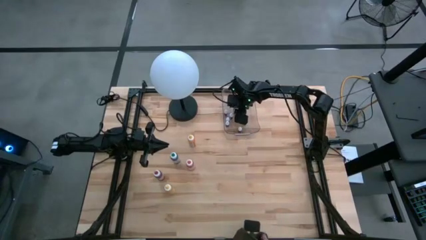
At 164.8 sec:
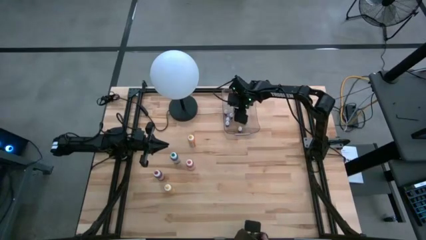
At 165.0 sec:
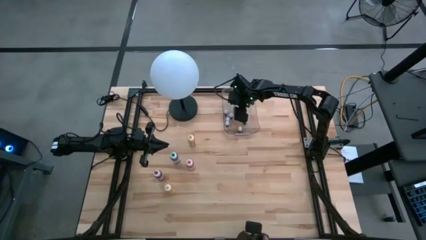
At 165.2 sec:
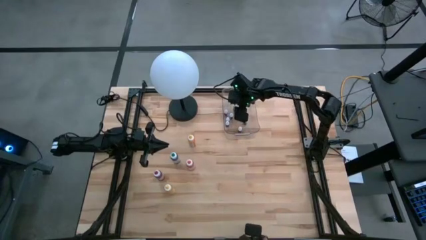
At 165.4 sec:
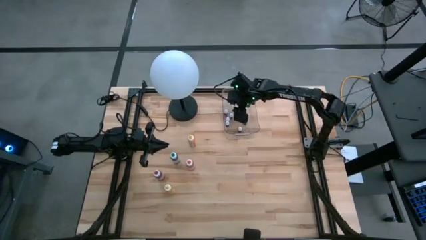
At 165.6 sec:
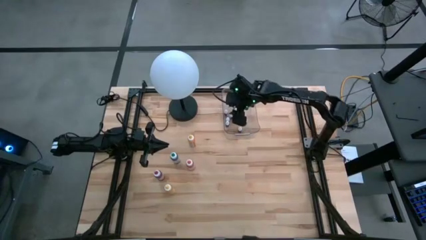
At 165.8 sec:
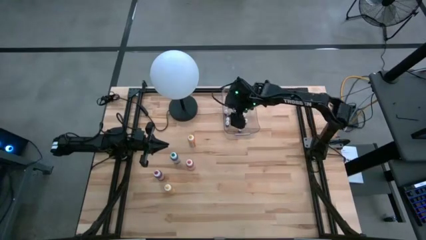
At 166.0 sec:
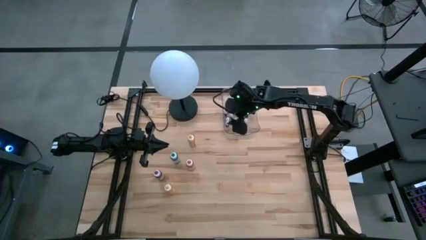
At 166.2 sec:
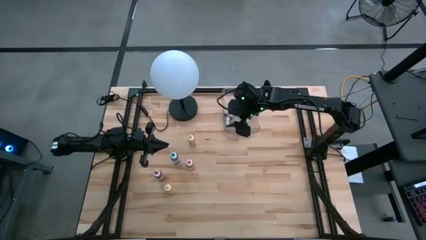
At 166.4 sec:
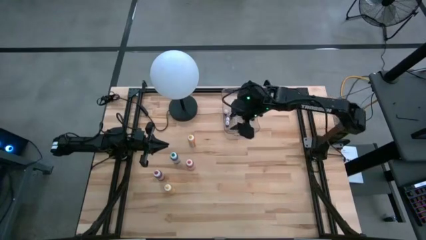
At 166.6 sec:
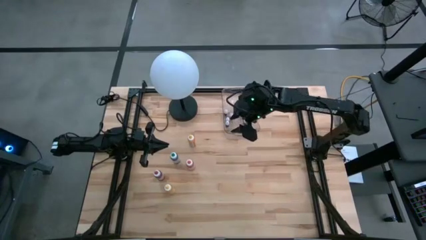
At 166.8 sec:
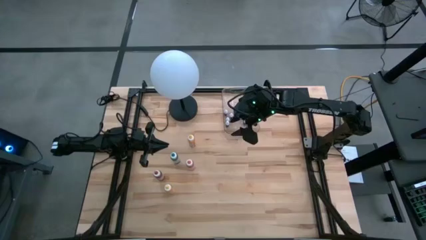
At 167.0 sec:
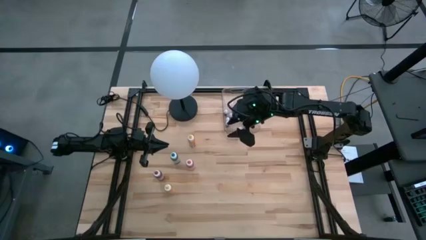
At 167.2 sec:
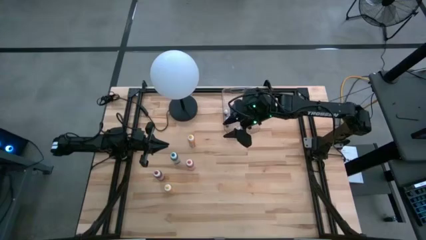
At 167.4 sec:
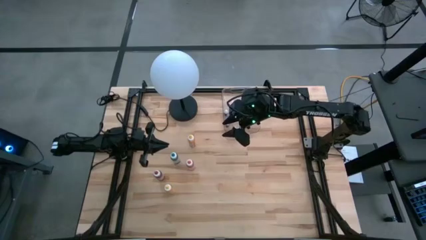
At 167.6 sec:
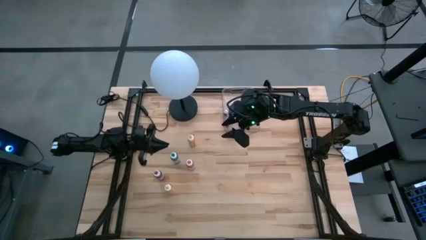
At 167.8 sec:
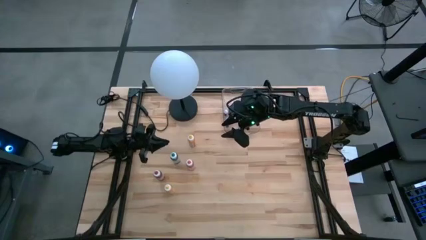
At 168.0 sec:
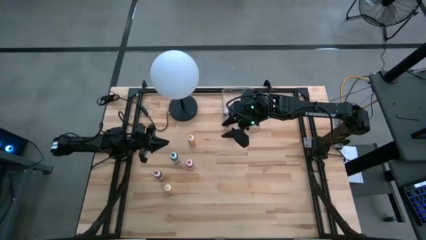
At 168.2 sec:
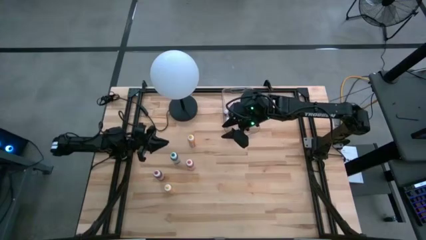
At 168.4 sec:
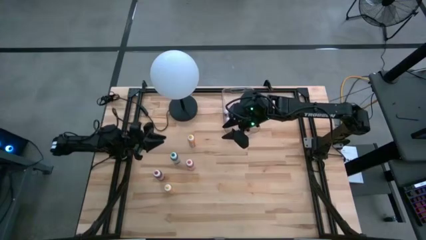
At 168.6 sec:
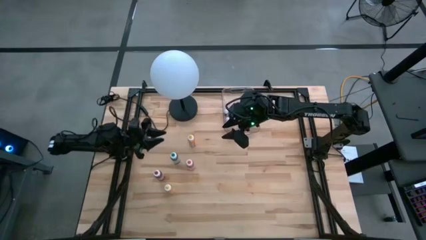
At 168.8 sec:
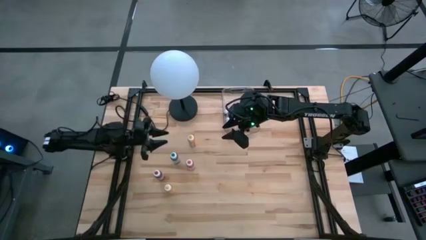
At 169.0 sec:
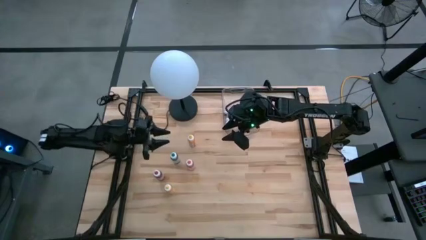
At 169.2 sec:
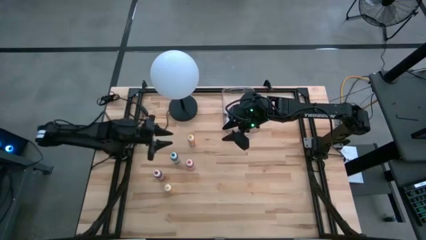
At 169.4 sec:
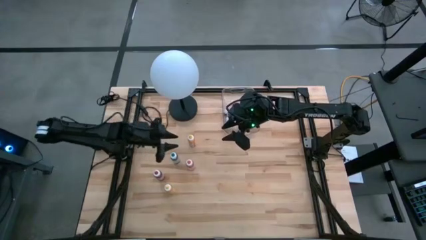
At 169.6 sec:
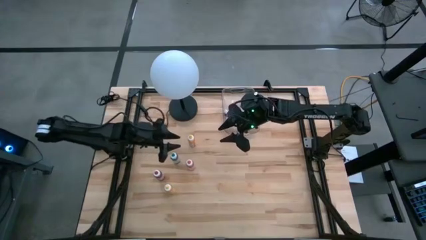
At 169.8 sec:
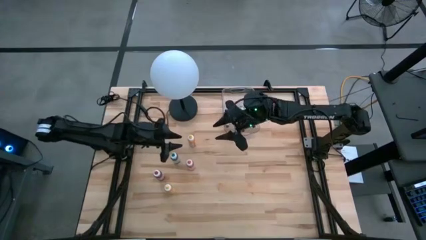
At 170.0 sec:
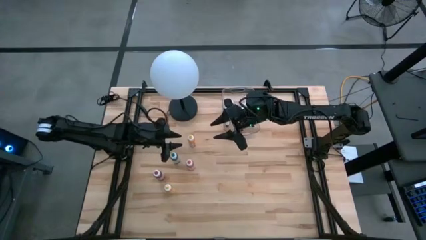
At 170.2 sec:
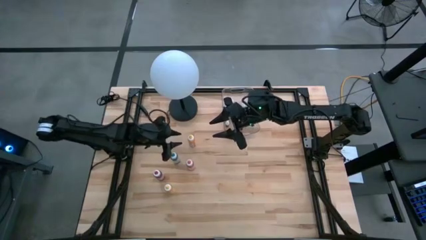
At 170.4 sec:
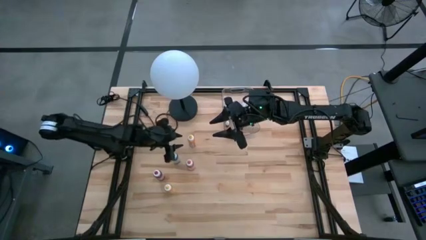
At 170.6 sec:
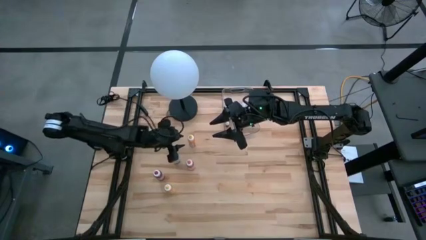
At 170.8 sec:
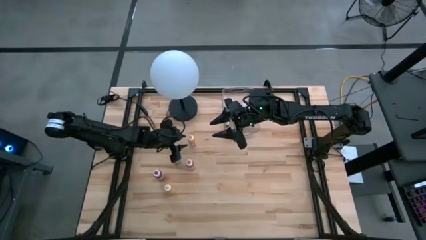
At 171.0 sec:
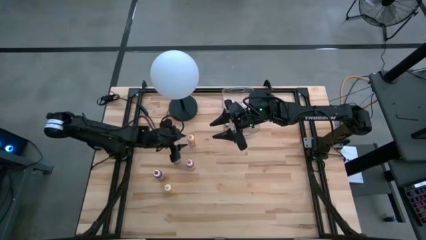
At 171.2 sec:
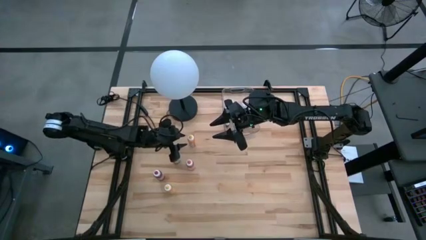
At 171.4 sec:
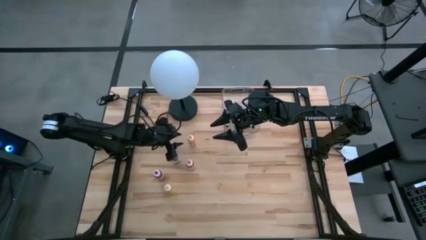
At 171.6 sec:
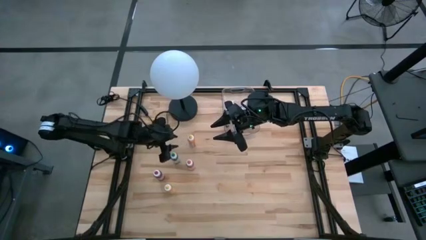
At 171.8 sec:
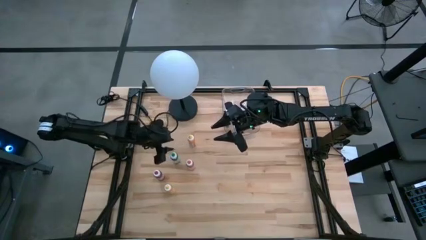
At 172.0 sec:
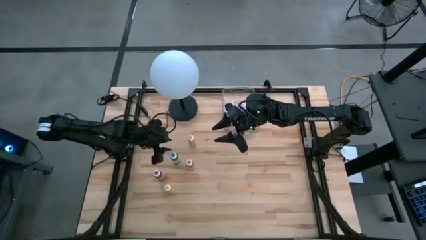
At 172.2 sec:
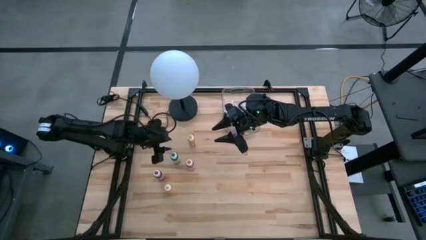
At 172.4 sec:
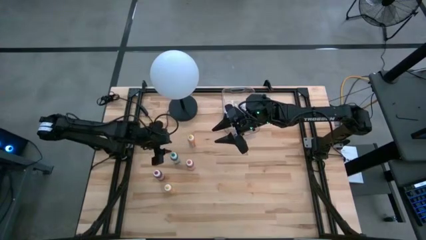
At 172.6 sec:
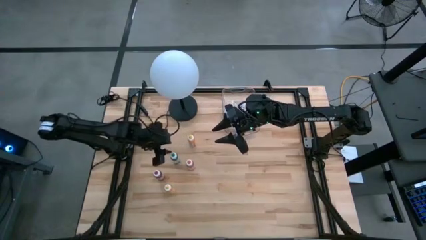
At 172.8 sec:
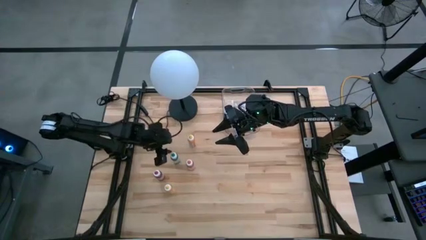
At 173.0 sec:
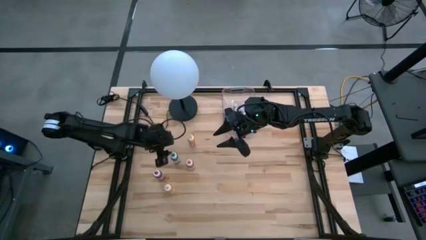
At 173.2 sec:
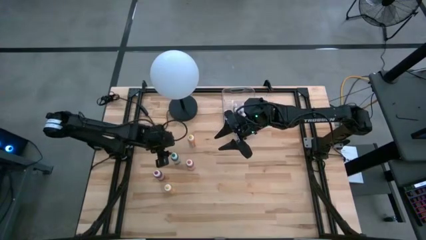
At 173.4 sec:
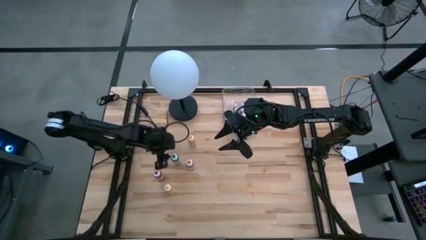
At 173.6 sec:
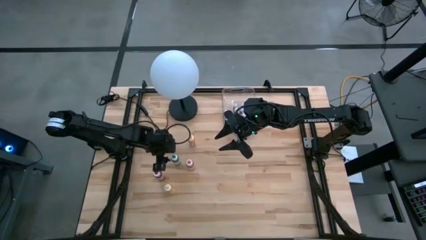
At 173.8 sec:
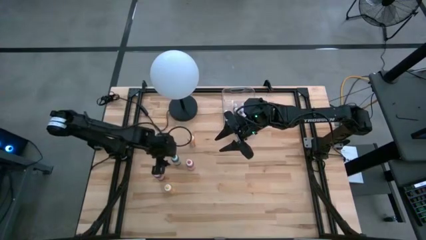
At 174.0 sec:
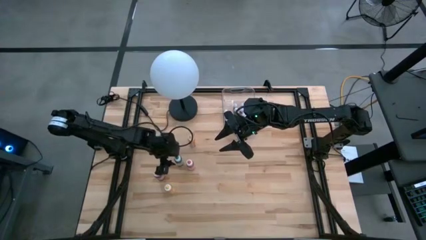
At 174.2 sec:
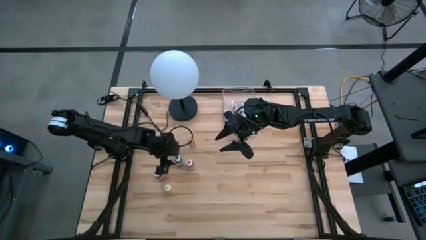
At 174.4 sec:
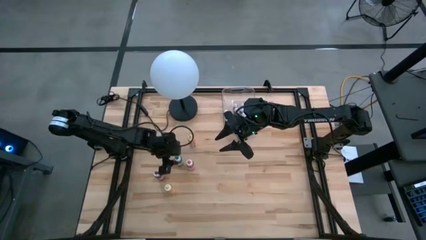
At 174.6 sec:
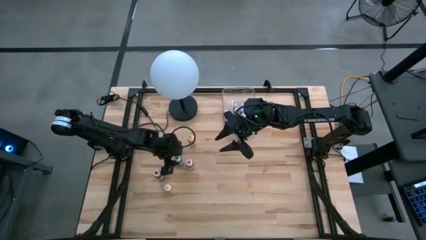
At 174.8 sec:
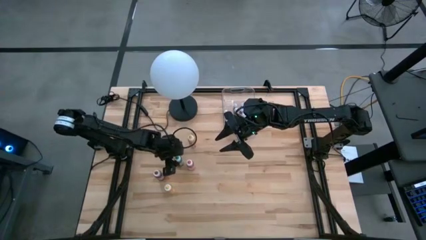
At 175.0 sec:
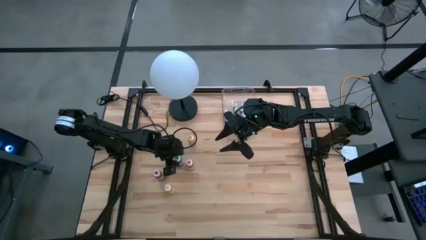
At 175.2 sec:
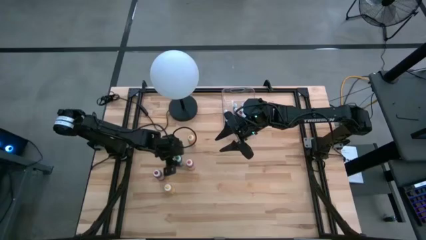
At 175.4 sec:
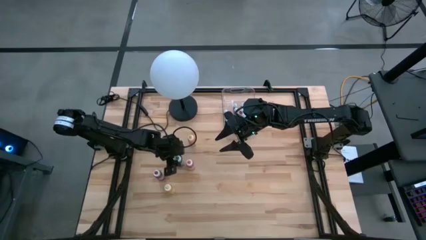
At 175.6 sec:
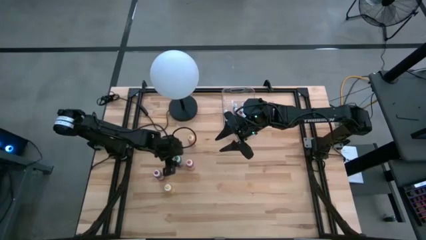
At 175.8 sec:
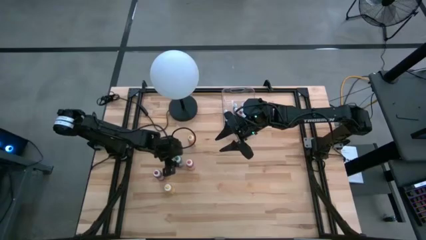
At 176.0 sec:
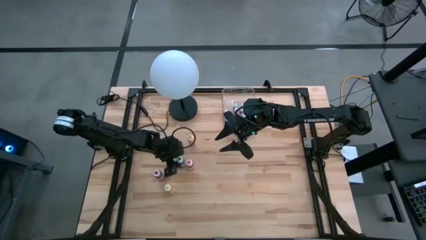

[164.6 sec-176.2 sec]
Task: Pick & Place food coloring
Put the large green food coloring bottle into the transparent bin

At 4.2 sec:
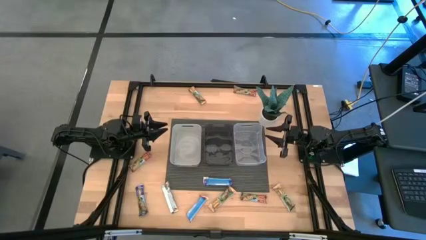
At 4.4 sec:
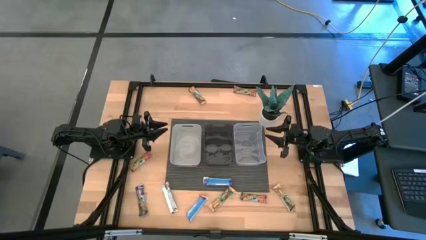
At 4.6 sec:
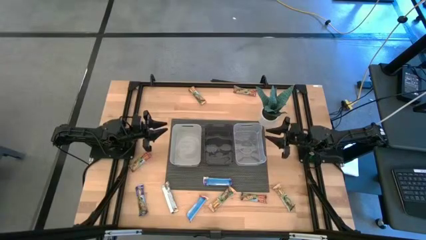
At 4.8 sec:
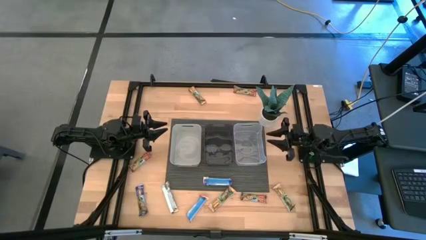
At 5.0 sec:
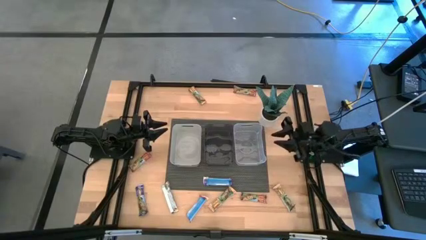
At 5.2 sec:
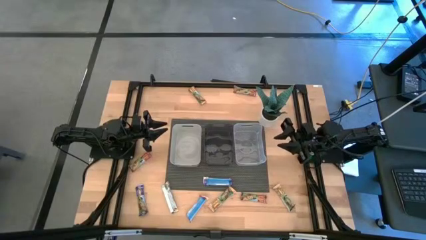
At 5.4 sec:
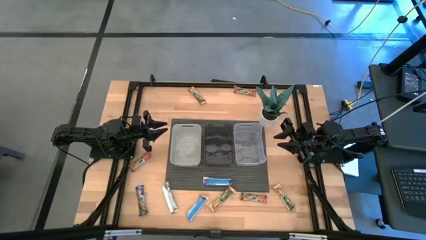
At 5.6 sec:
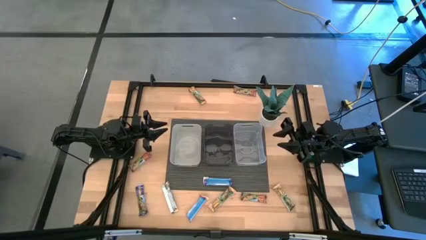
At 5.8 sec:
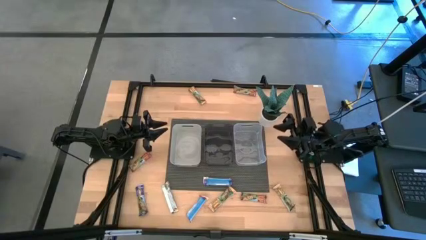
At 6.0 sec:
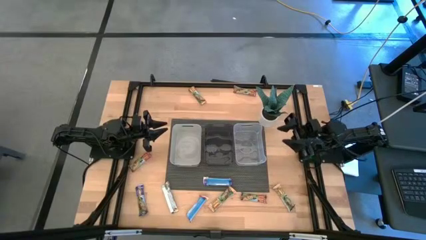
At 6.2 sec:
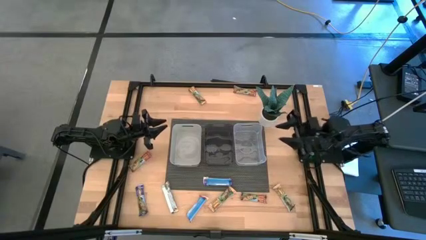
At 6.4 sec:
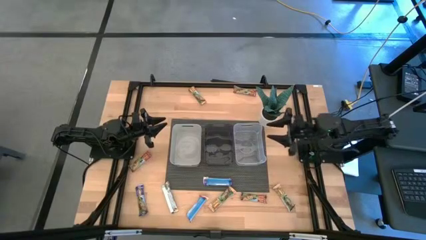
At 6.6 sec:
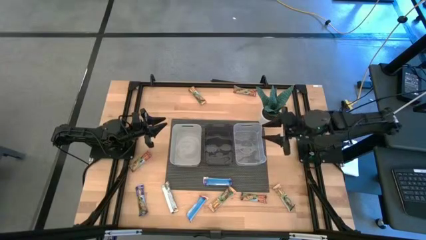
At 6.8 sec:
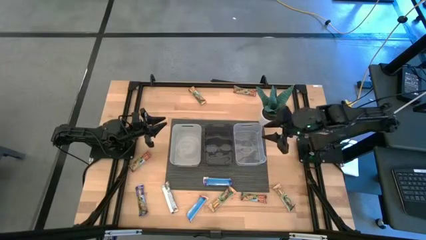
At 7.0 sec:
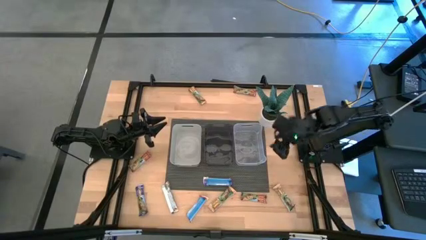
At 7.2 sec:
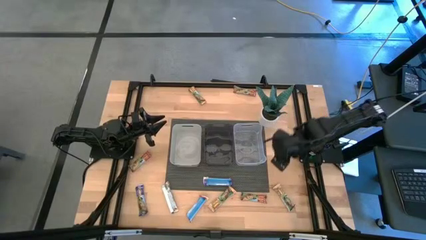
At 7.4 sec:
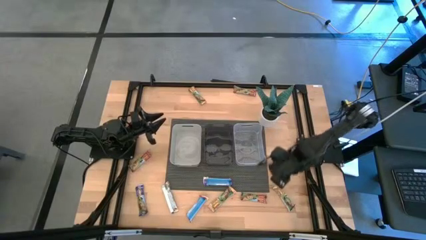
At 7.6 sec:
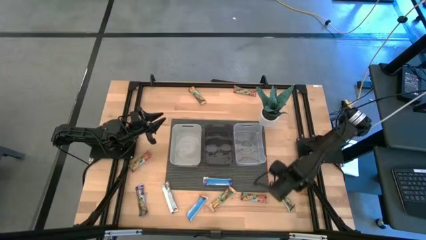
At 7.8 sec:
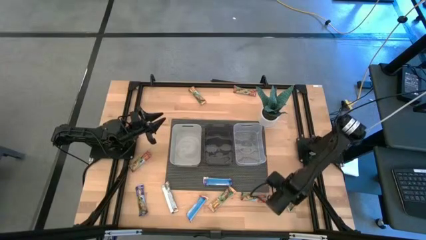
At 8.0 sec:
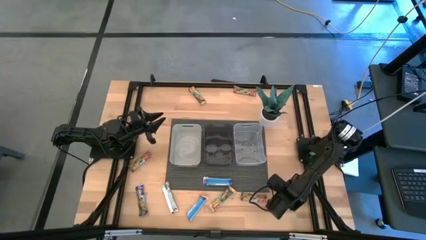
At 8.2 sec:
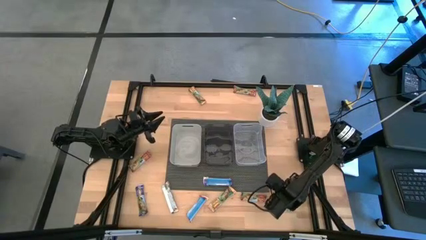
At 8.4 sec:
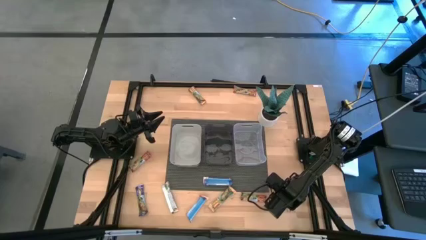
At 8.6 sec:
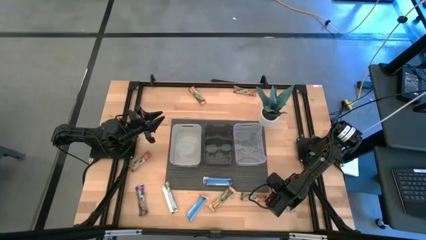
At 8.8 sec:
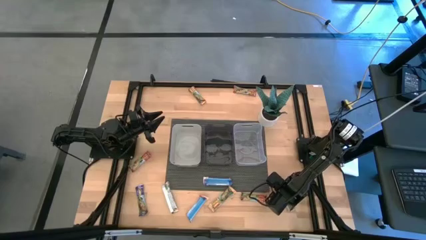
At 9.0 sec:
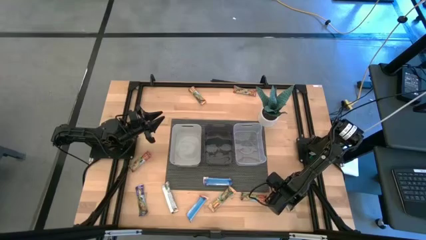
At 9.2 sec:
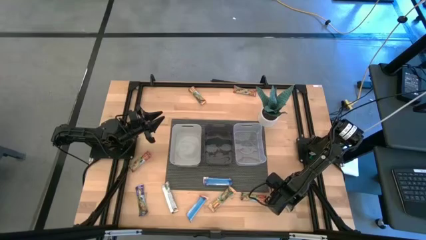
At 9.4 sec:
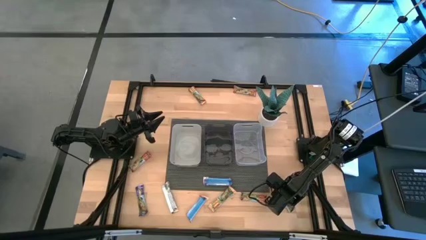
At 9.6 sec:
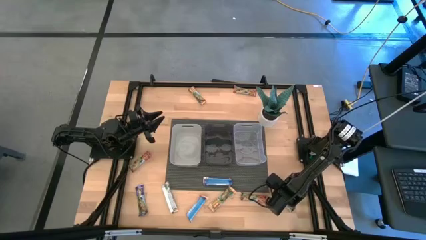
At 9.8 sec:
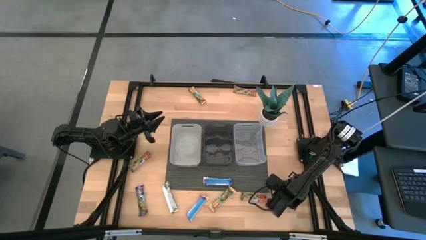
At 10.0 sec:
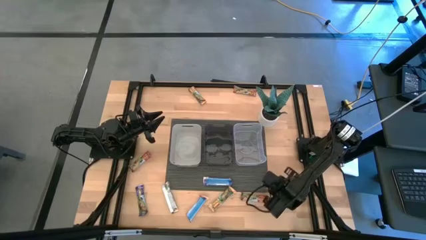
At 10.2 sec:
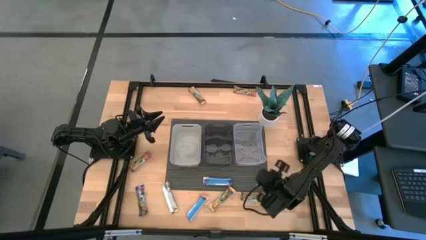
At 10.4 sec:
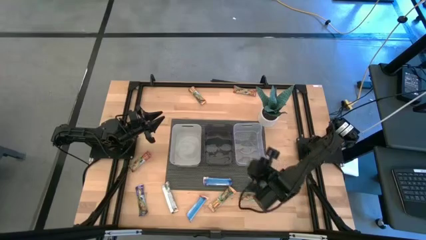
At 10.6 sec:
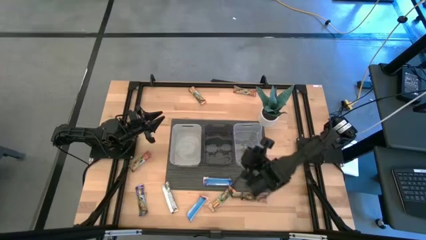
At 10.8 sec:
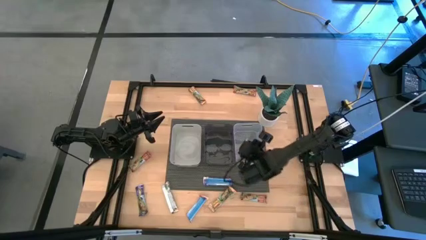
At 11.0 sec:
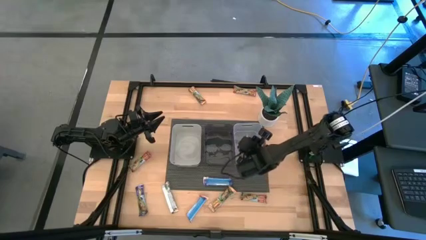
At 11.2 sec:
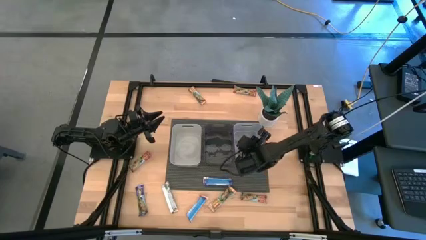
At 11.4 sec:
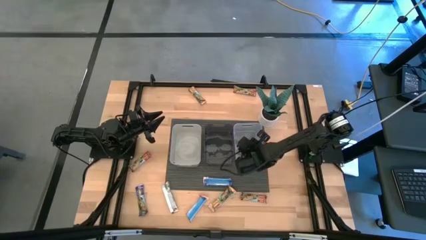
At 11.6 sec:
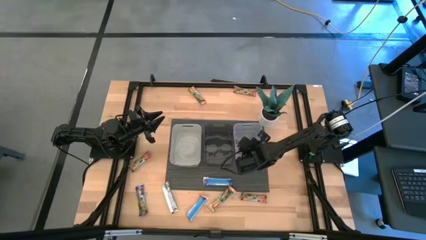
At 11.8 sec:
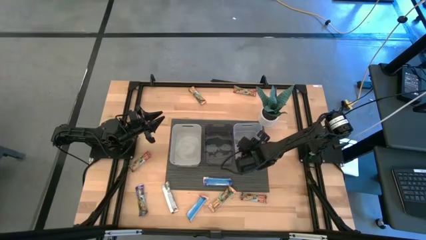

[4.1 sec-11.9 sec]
Task: Pick and place Granola Bars by type
Put the orange granola bar into the transparent bin
